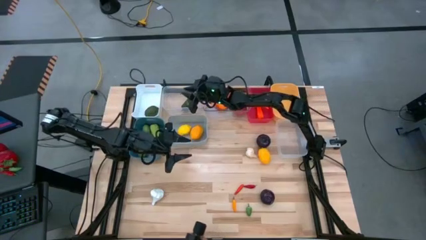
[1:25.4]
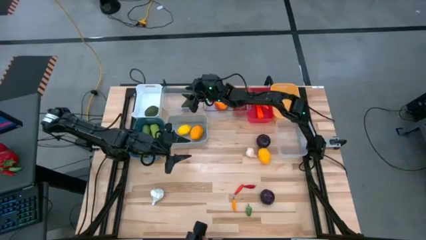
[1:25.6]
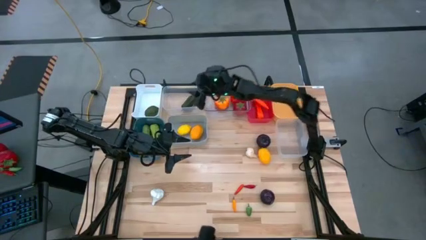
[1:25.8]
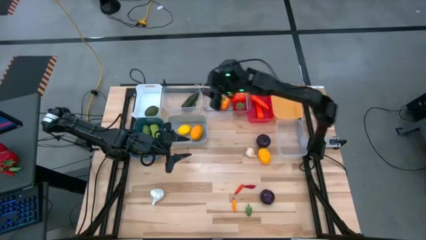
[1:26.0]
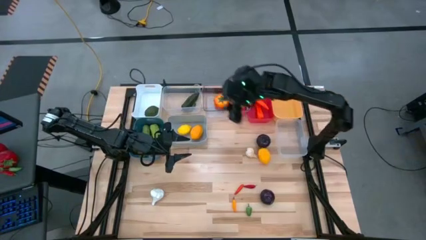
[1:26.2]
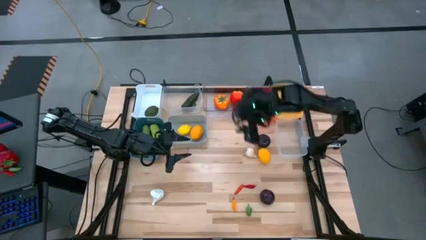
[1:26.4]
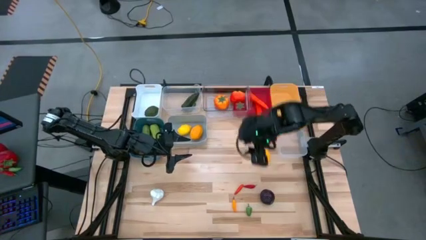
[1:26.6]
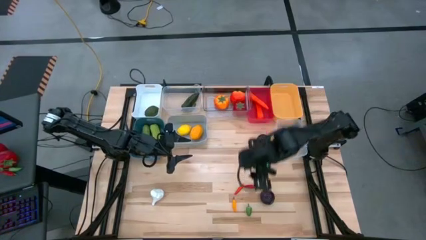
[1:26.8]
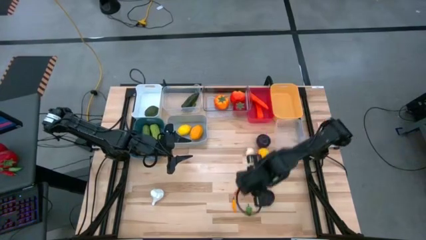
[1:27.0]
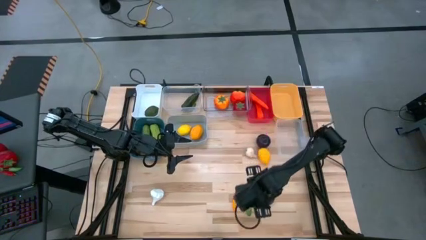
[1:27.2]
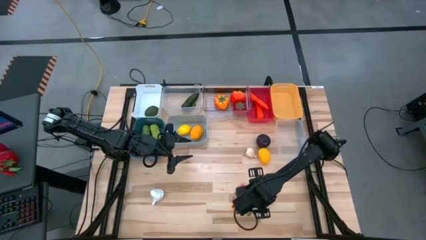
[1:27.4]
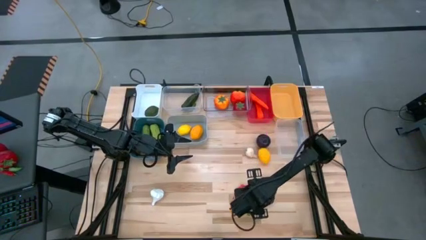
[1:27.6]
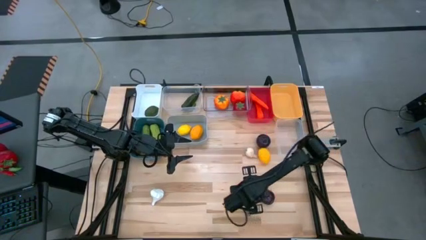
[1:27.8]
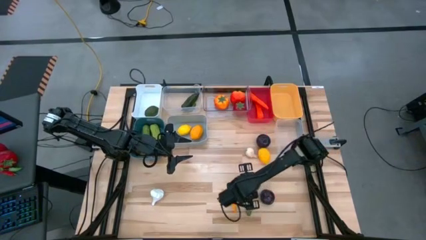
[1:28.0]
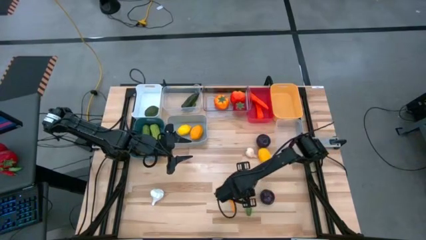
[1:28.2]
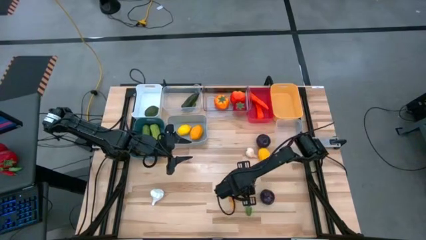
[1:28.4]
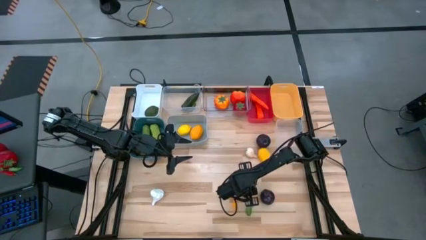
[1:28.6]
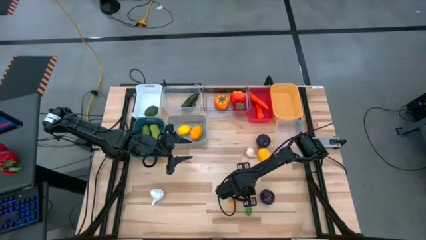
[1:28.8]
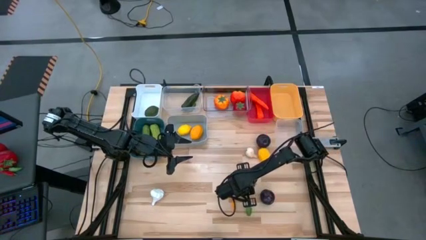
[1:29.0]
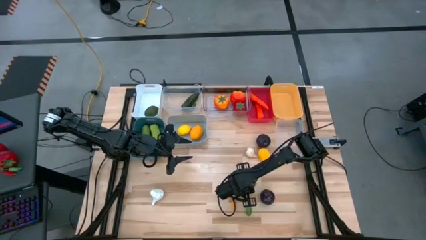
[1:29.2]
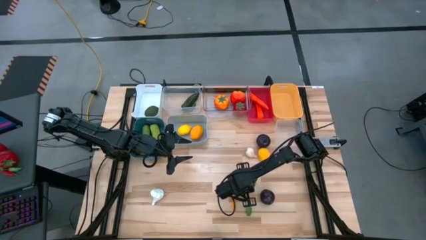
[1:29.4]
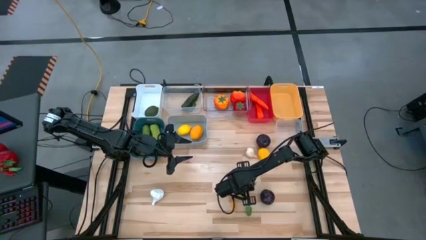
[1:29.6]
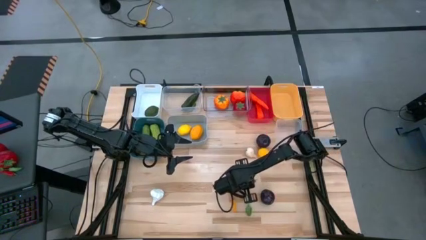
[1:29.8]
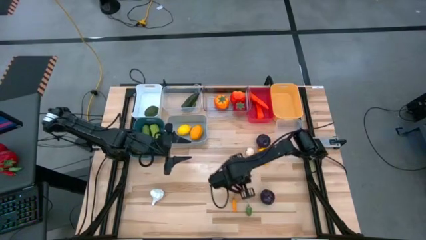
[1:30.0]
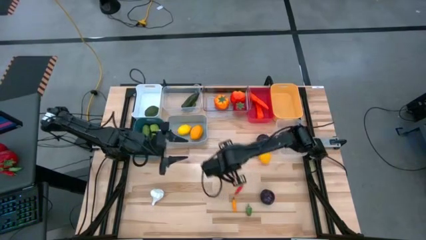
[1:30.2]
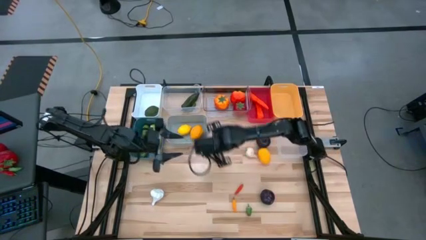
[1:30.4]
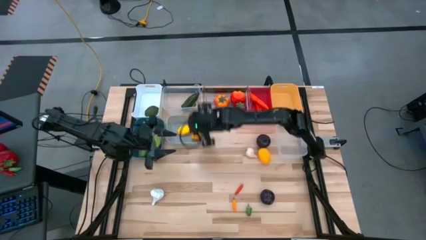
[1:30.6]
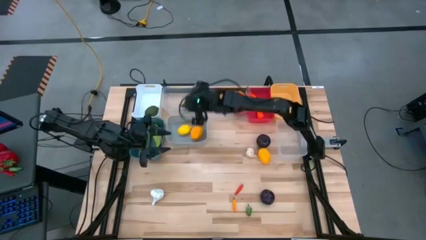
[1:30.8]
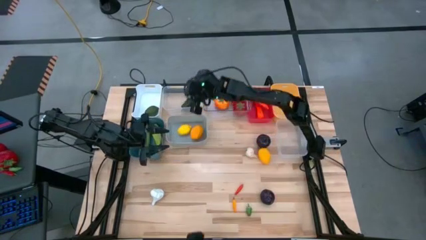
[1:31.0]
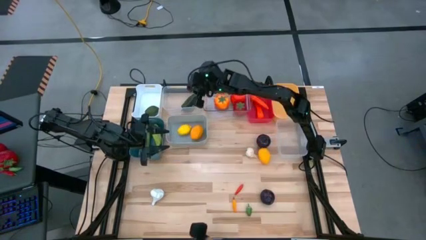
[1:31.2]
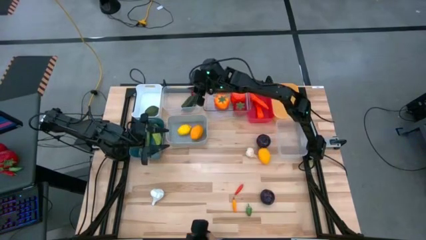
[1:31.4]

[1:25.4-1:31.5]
Task: Sort produce into baskets
Put the red chili pepper into the top left transparent bin

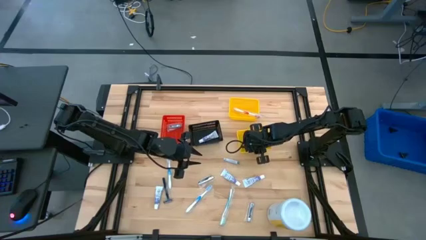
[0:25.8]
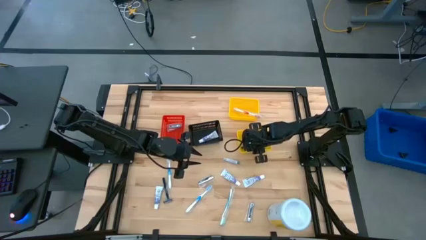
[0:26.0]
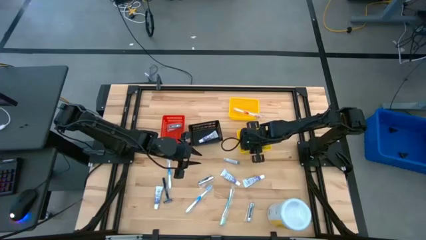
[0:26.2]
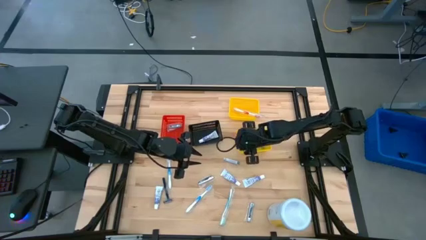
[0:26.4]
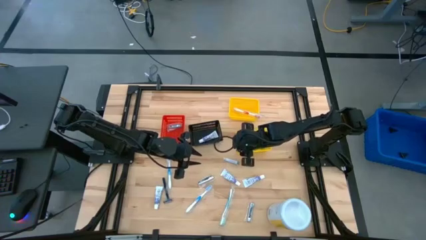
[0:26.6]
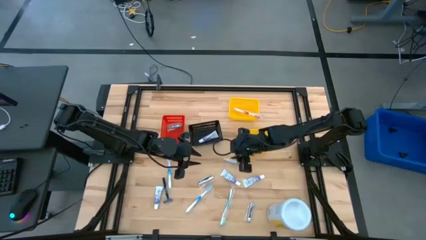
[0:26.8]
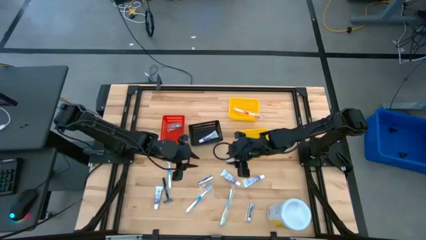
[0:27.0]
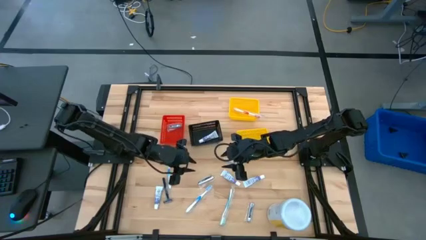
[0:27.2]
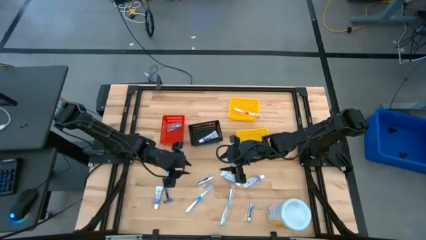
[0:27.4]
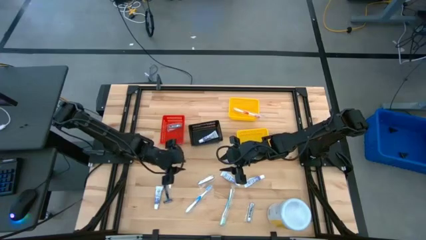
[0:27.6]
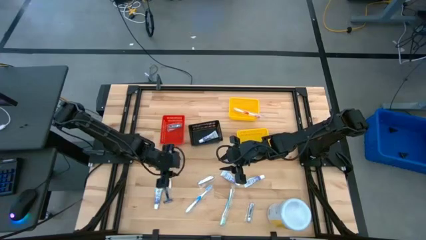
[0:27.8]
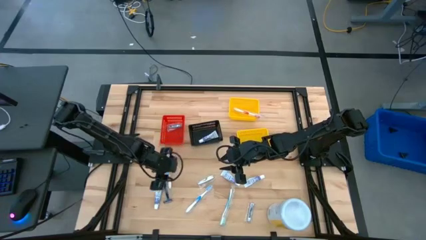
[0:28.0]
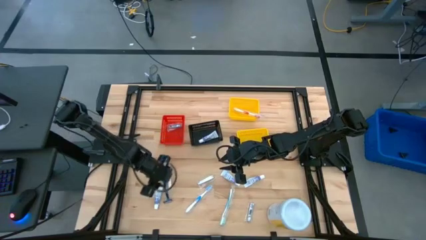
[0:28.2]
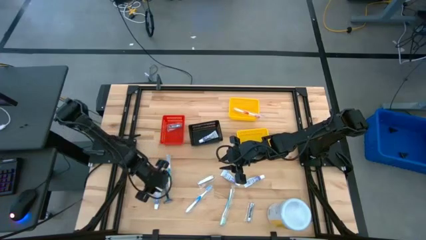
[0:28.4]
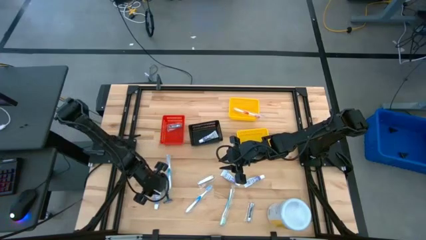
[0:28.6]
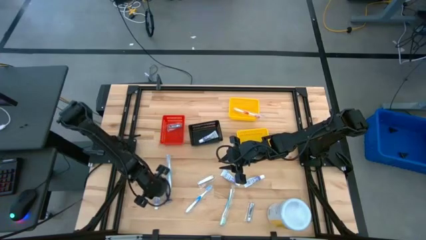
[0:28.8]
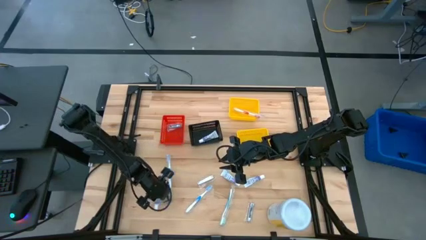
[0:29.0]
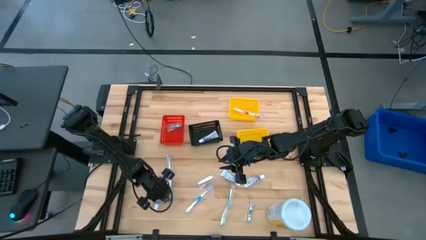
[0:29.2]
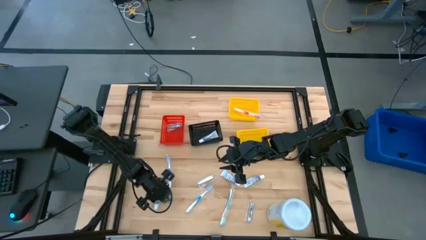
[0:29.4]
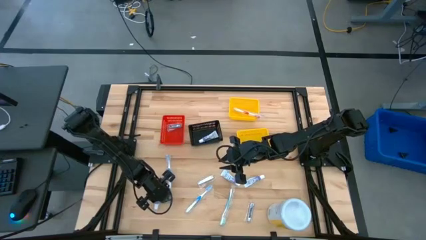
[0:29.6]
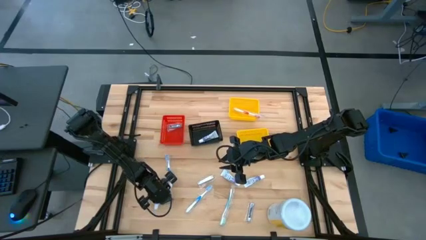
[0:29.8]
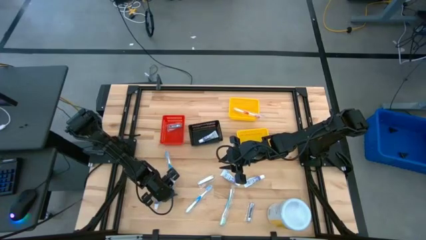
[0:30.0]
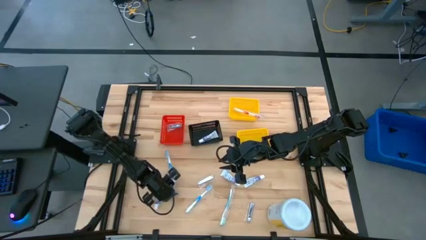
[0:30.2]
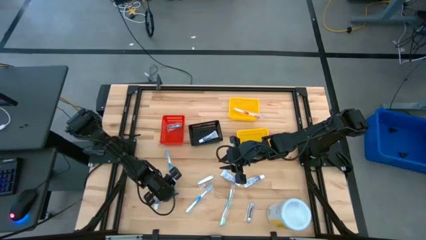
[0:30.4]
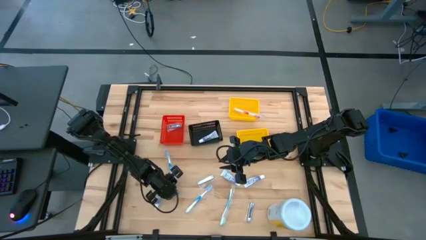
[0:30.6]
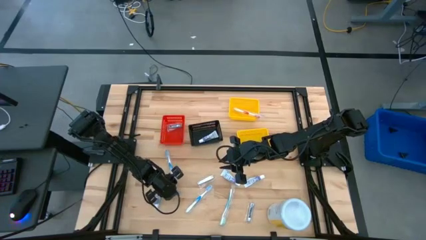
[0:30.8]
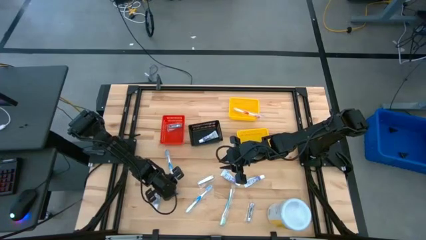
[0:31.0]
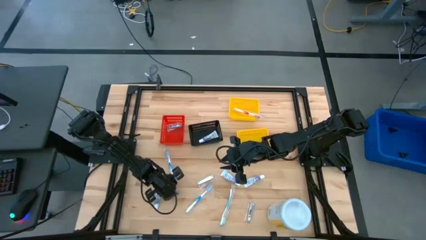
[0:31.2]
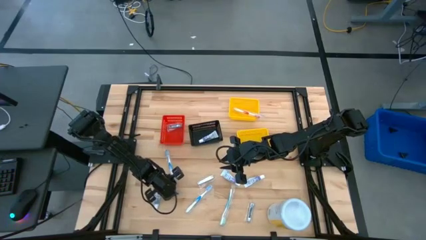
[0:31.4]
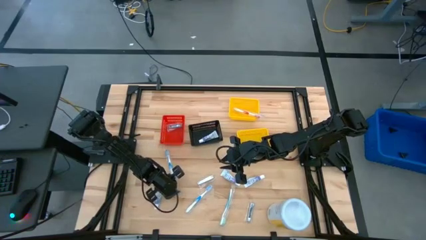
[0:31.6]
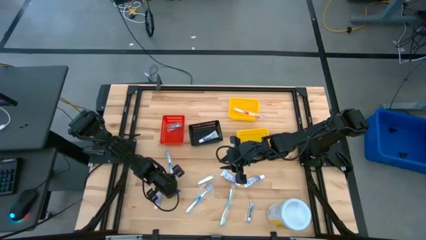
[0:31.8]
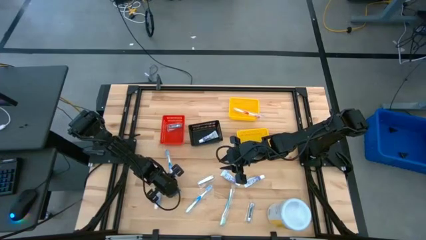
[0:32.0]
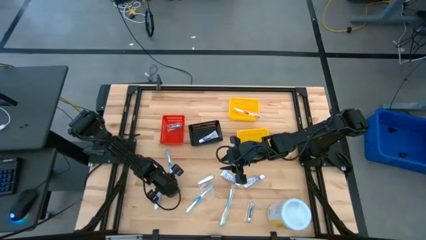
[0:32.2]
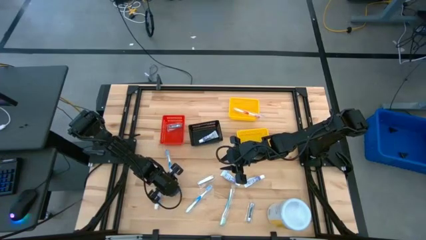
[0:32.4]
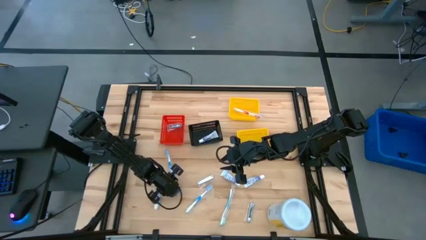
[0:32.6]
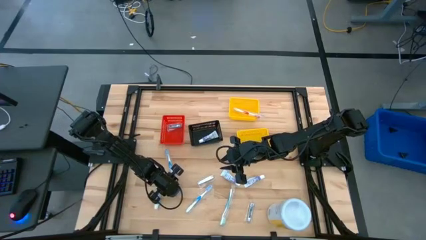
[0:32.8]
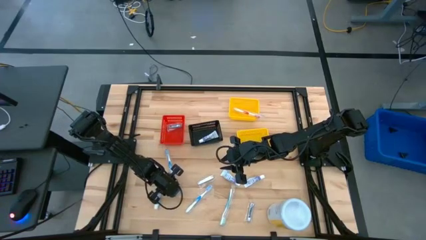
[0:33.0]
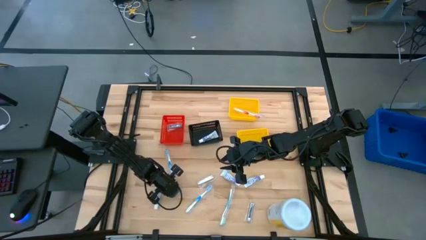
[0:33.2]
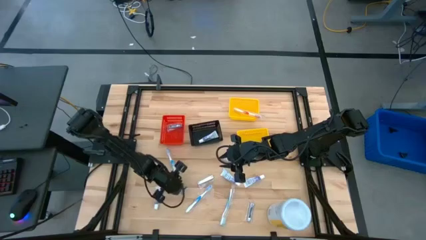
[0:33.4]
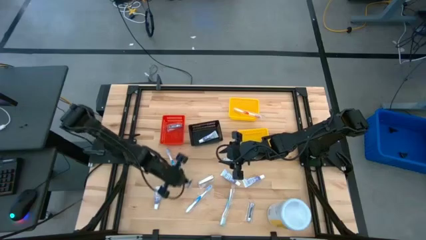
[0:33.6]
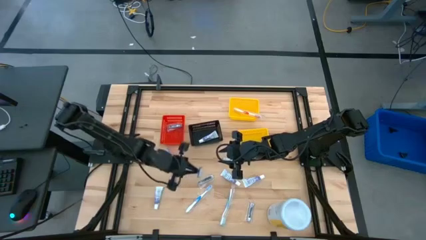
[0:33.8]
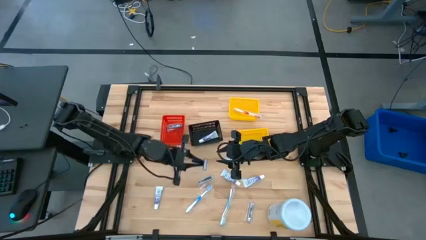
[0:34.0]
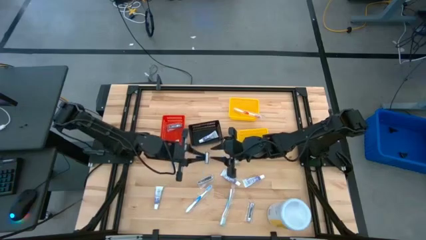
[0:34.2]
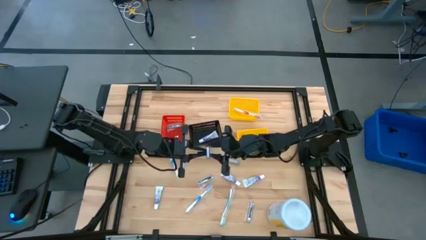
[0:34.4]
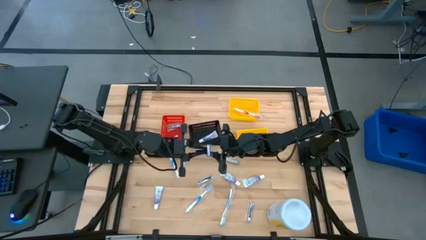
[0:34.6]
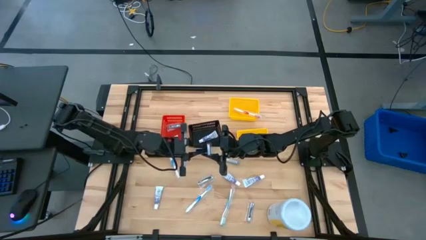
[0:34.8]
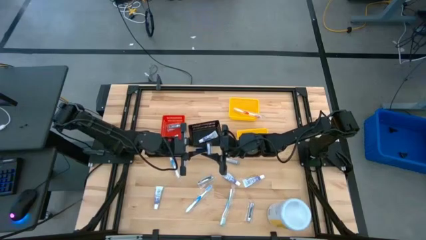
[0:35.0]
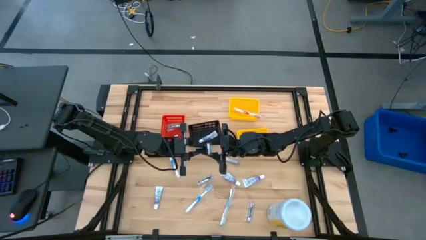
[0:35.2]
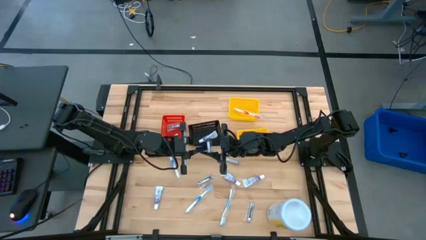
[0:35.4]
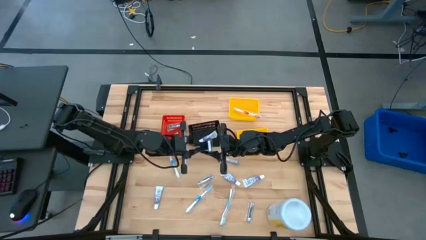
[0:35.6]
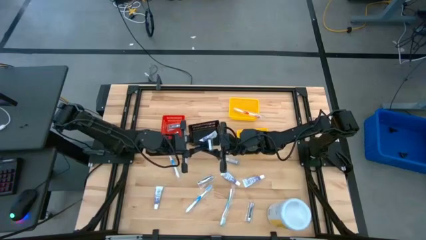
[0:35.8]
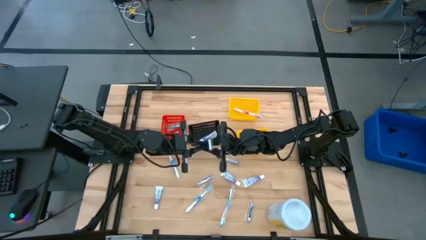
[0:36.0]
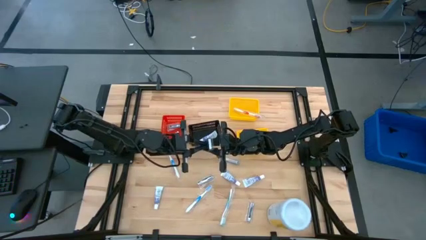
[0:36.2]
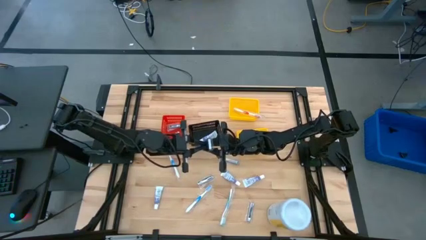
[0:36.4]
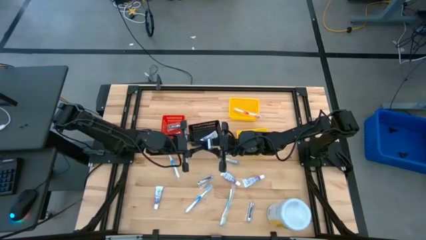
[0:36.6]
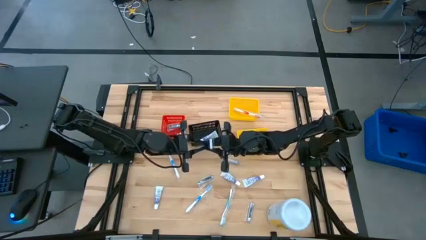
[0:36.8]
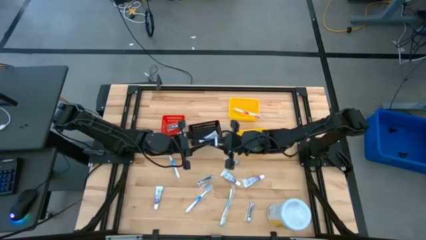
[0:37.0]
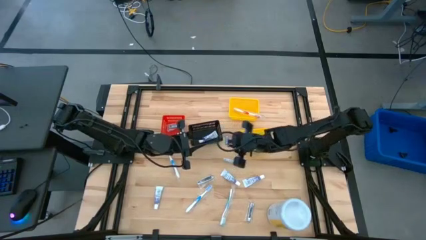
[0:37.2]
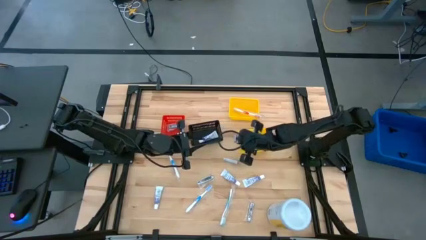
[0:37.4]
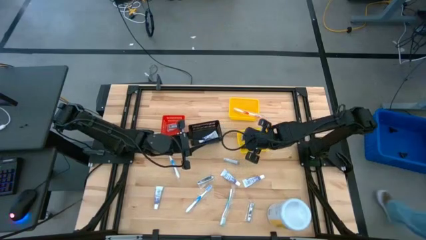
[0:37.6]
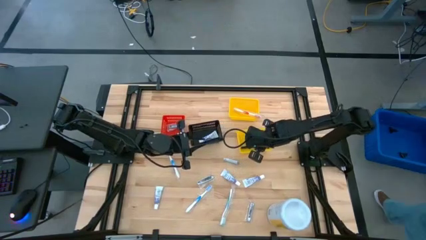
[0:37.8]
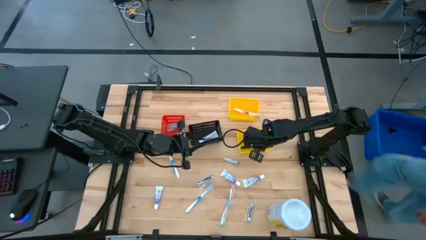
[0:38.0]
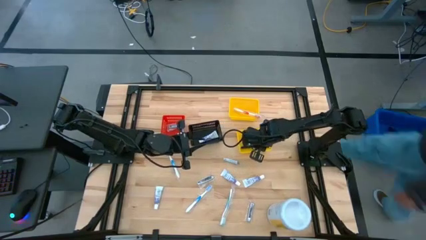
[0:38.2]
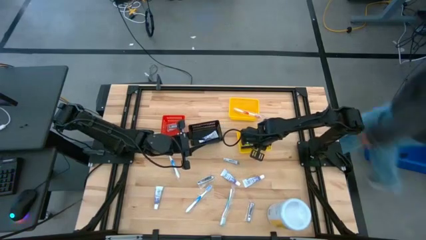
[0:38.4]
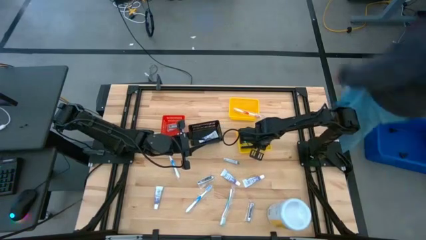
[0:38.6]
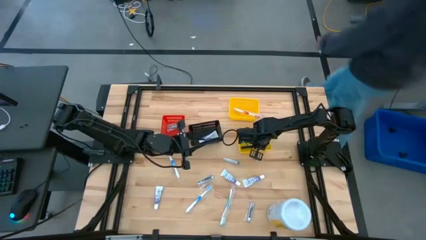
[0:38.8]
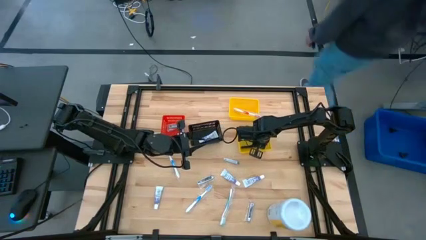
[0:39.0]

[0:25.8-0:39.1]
Task: Pick & Place Travel size toiletries
Put the blue razor into the bottom yellow bin
